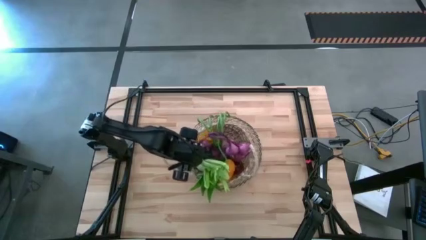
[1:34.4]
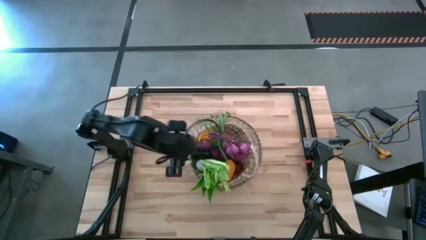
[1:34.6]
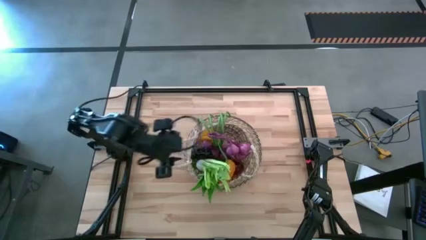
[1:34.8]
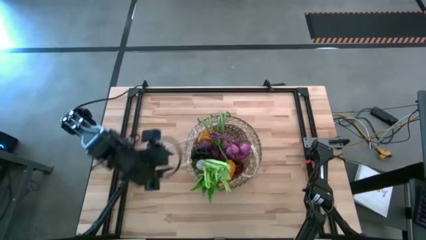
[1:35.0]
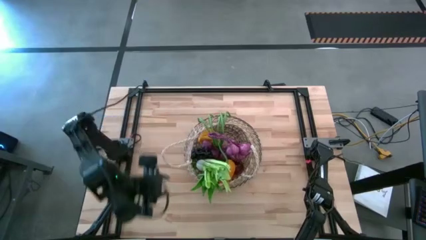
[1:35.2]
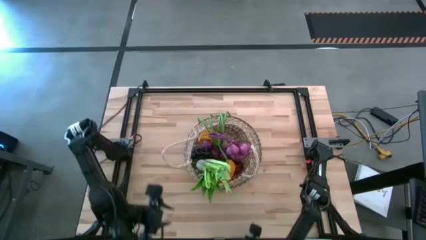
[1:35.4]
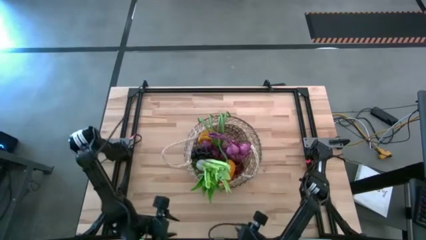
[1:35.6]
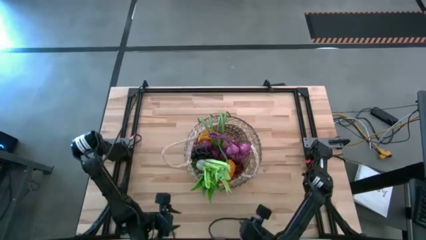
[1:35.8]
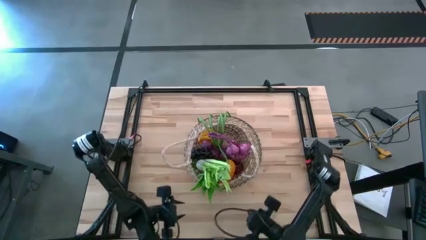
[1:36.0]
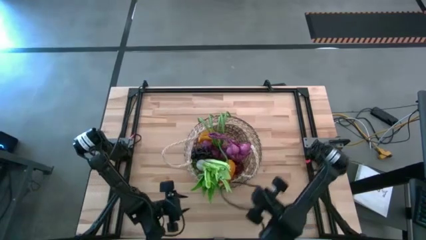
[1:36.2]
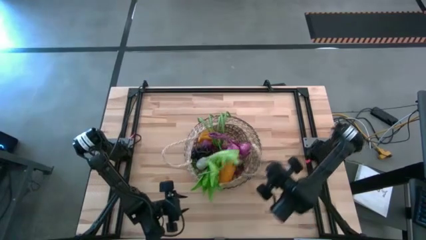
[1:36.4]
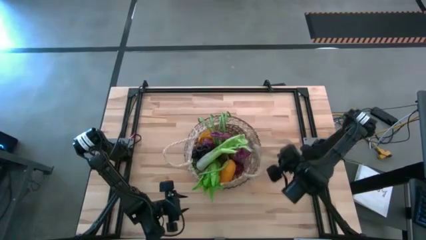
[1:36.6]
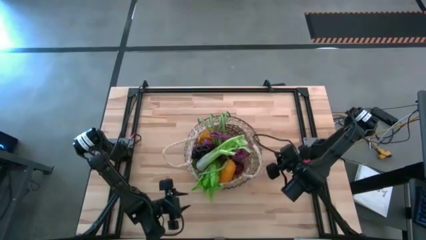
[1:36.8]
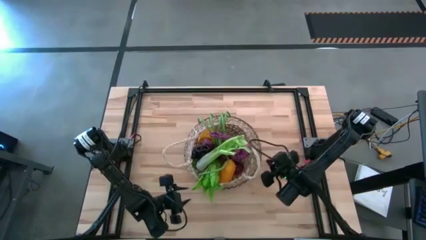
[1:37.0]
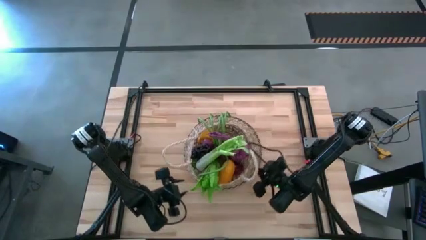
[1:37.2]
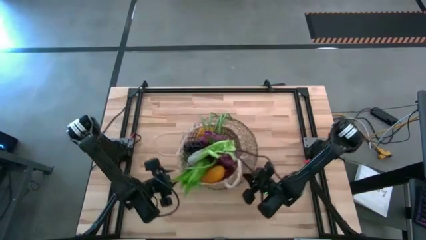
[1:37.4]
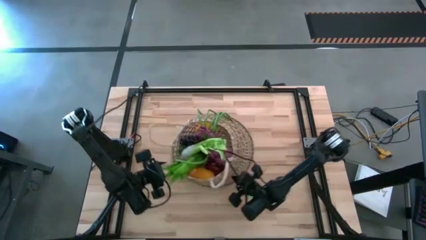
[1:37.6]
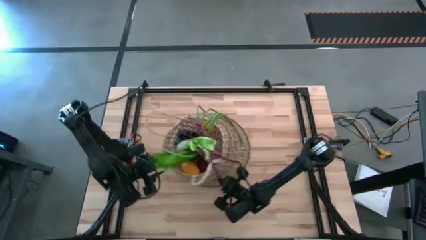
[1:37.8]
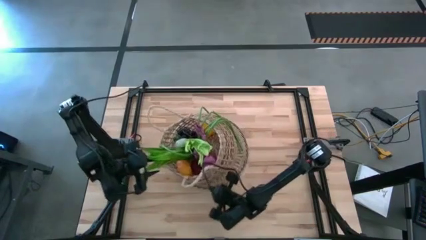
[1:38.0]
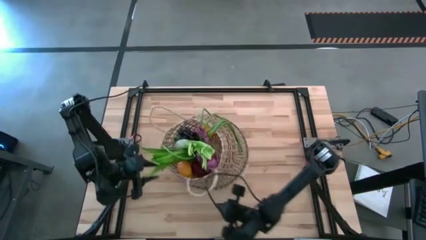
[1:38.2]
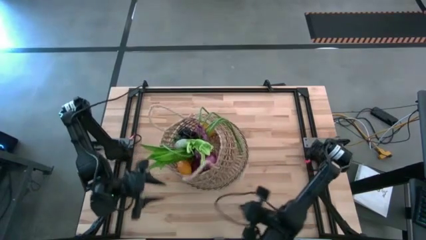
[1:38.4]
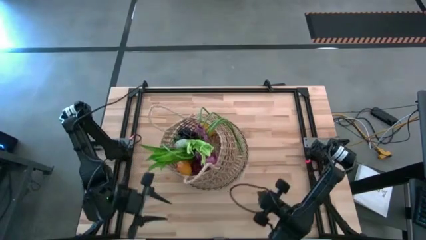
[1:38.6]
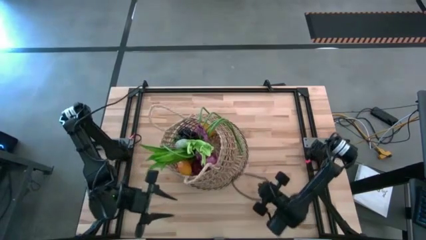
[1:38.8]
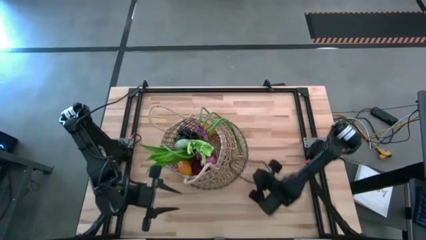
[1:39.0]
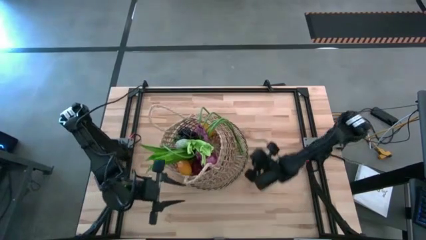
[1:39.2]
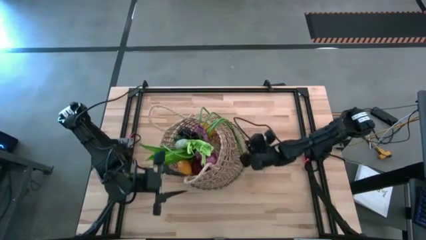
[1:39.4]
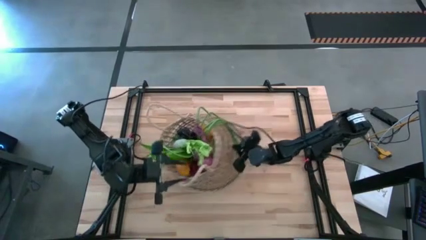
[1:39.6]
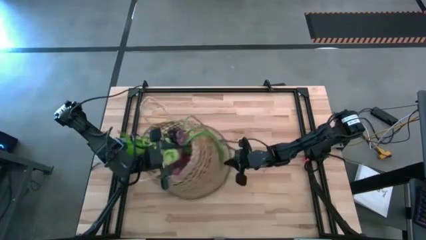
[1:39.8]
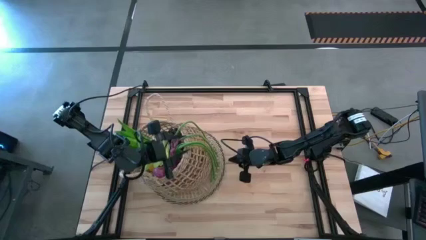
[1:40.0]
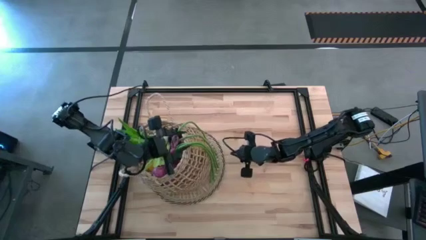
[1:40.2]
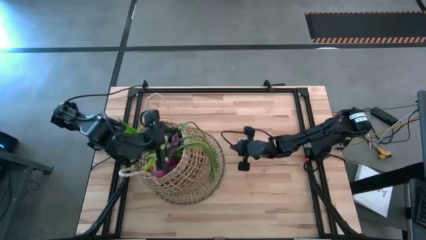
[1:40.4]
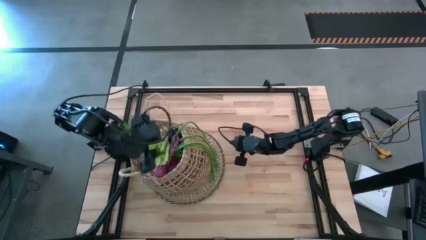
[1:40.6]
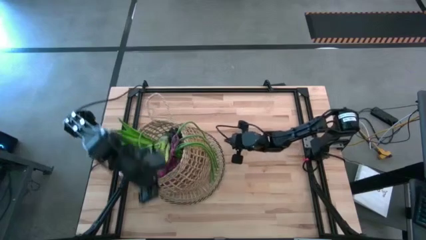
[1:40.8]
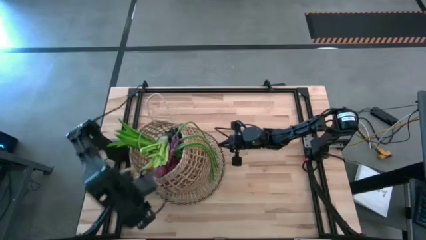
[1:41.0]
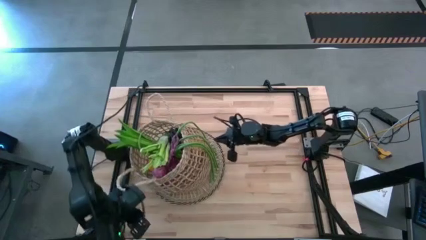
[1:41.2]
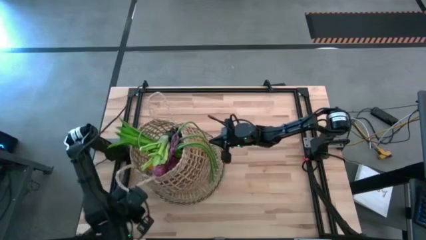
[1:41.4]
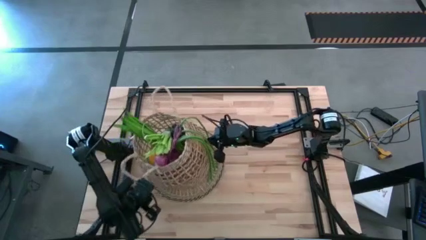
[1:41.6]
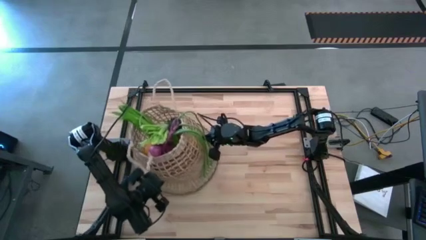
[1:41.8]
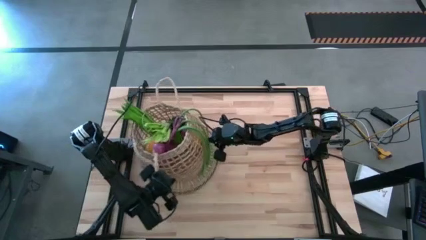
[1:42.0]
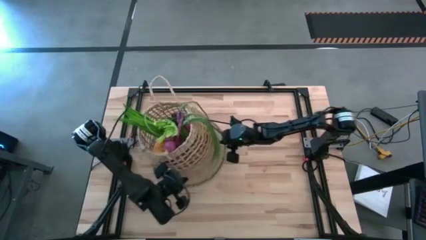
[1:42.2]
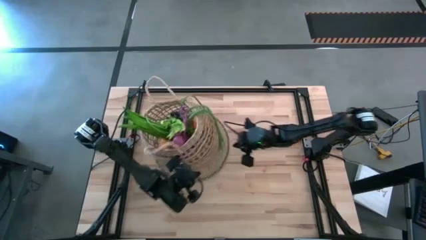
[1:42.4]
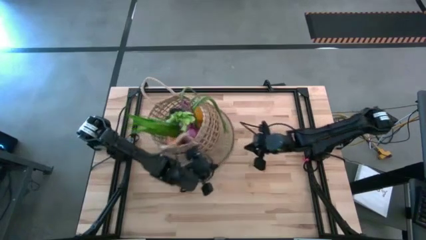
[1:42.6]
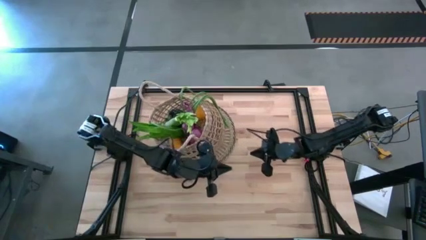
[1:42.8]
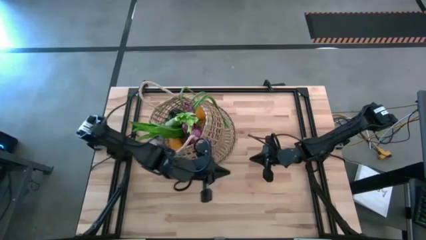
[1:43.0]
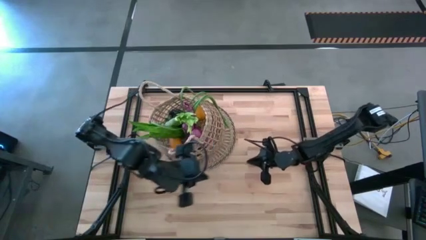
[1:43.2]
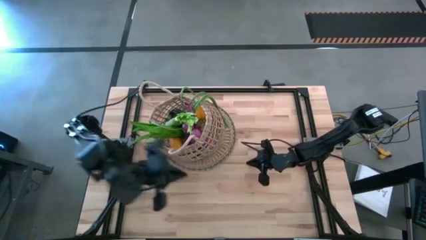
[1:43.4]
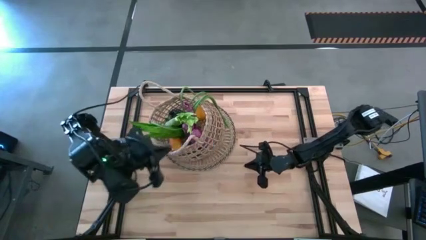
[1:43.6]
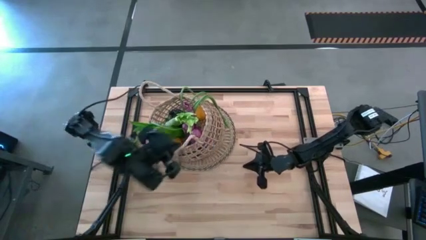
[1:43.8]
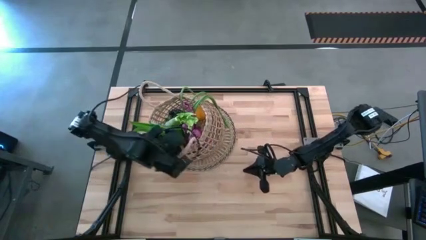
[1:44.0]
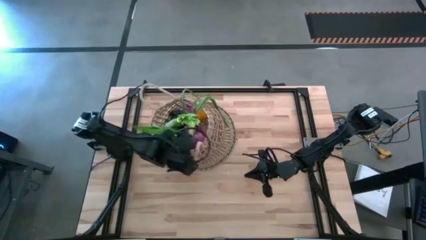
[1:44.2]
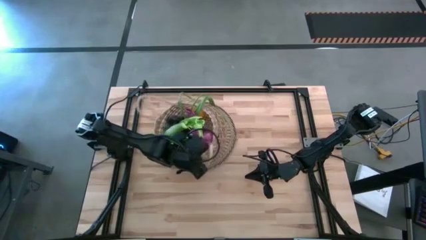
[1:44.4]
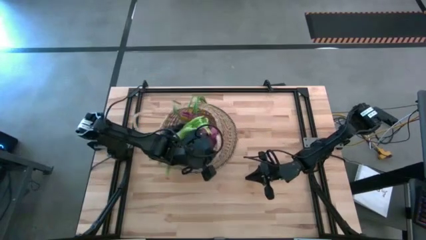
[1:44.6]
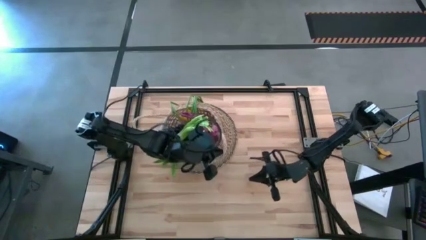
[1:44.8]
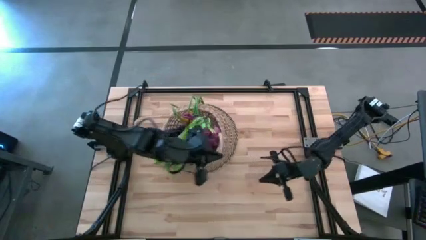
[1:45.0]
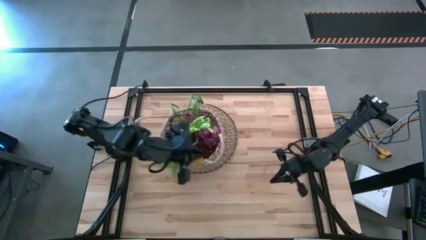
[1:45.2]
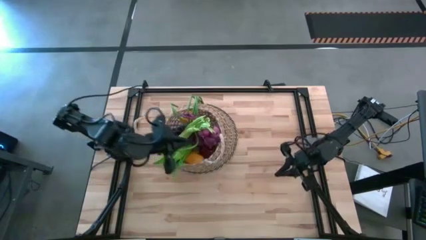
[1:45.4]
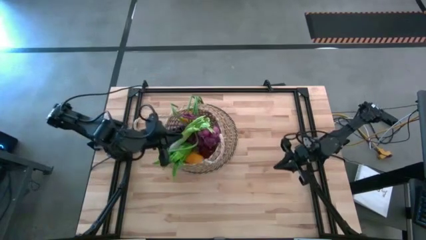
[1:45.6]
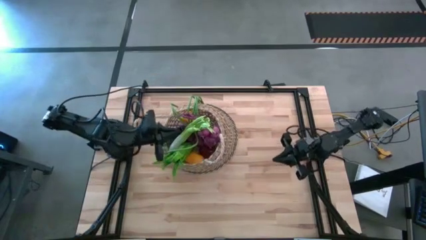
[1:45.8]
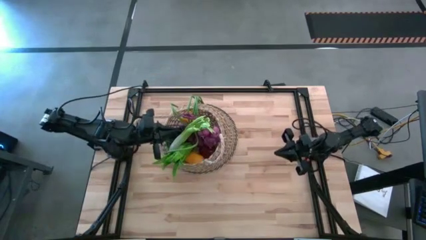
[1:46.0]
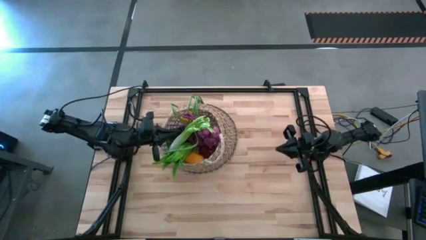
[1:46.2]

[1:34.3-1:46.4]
Task: Build produce basket
Adjust the basket with fruits and vegetables

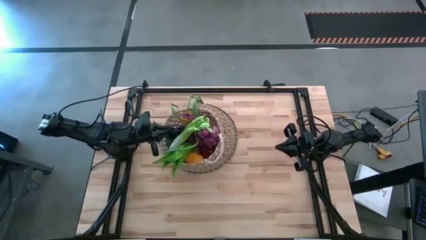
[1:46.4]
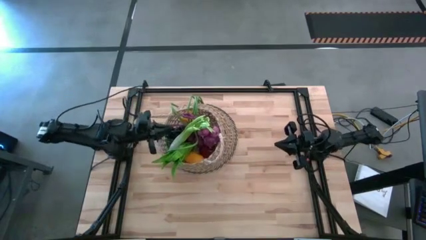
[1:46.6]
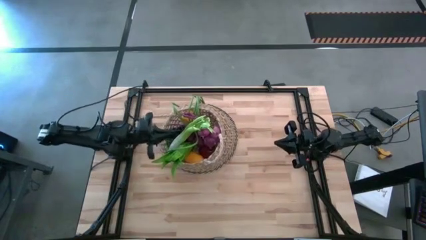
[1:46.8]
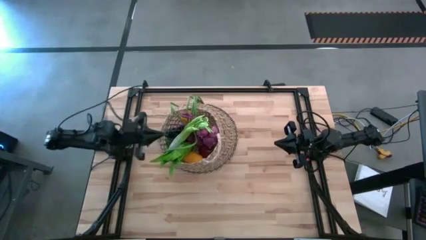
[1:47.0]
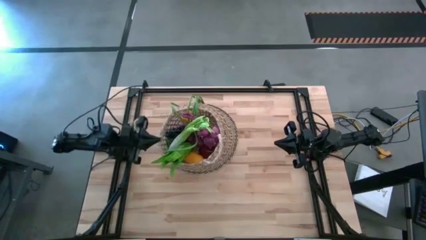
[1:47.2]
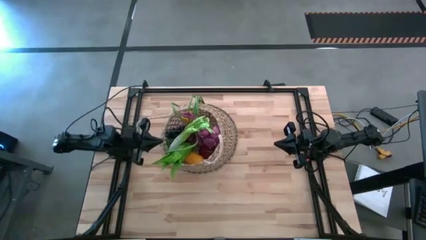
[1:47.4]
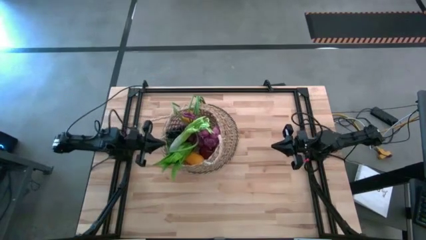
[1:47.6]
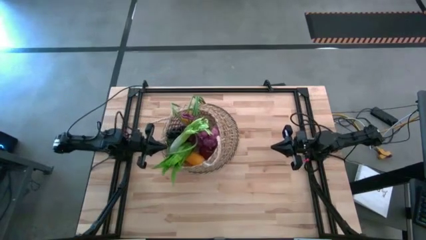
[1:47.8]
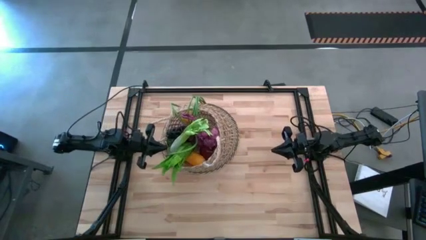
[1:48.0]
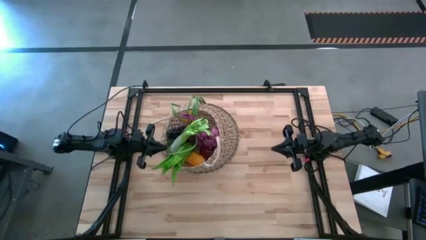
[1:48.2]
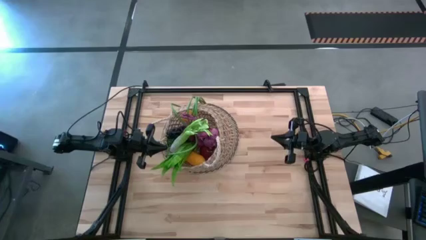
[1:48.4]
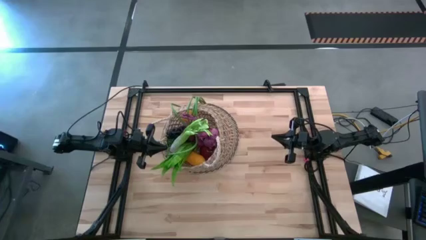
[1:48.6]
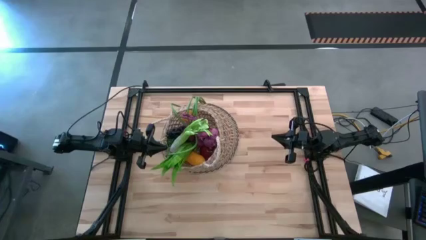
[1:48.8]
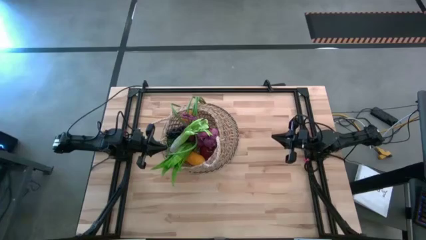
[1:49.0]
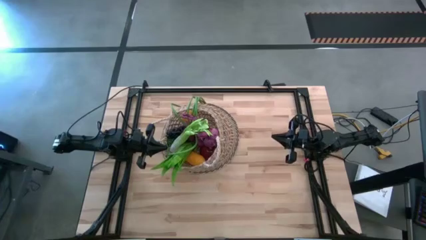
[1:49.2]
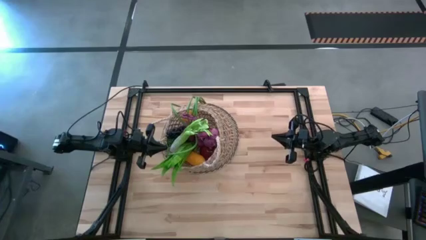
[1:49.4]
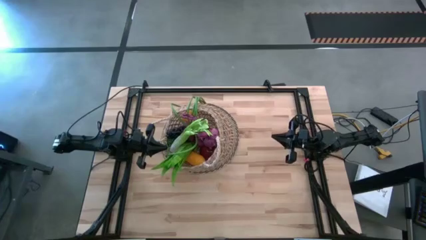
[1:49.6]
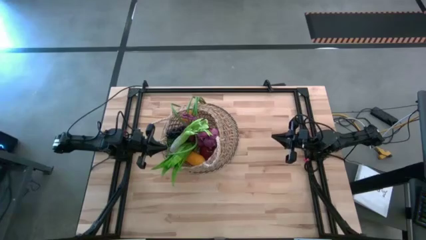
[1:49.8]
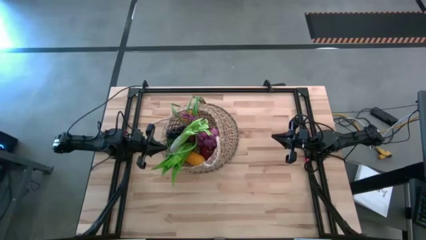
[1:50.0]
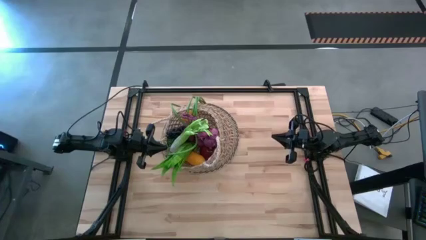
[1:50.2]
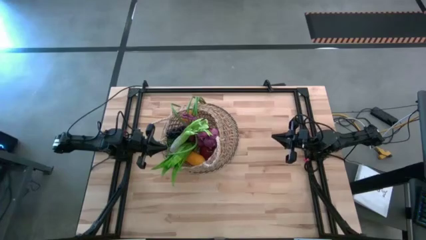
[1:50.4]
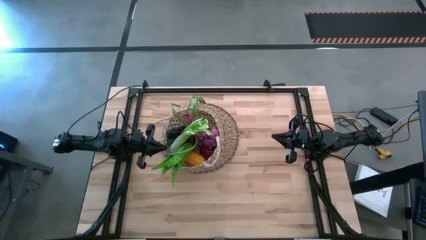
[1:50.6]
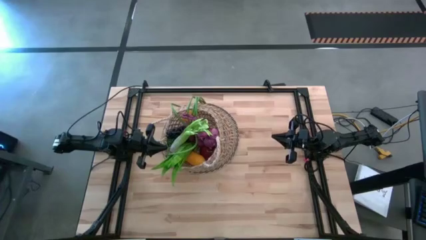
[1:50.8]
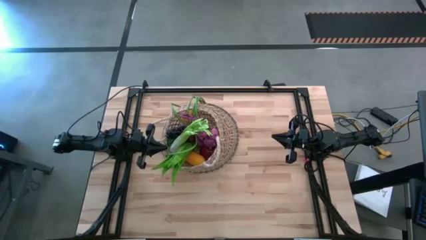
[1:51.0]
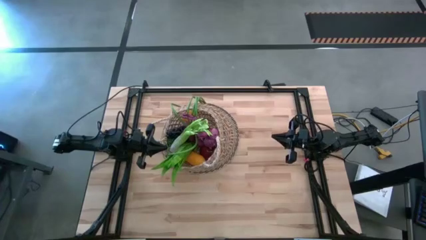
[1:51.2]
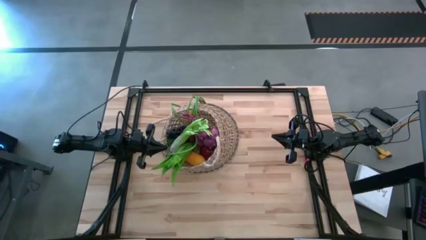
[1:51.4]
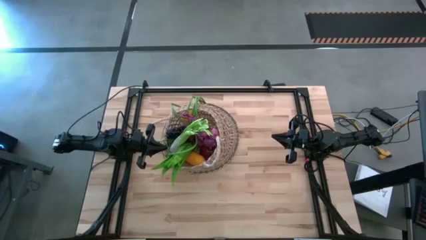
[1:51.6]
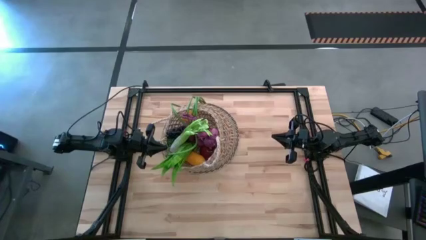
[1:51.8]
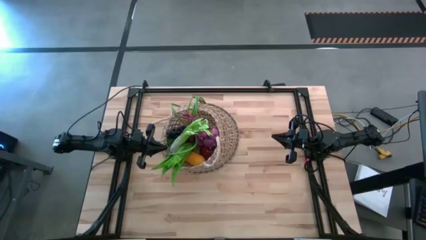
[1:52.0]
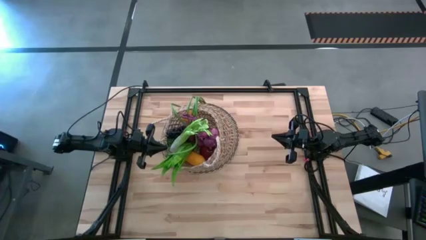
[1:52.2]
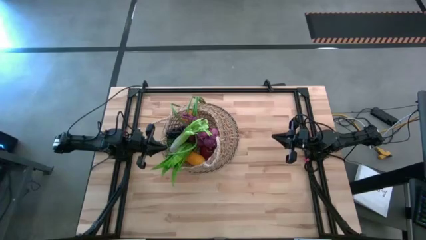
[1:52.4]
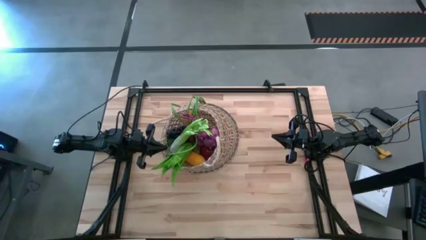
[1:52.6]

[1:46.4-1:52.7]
Return to Home Position
